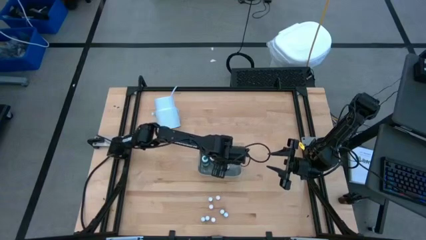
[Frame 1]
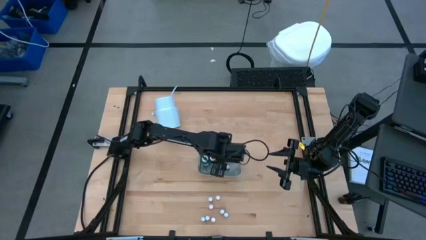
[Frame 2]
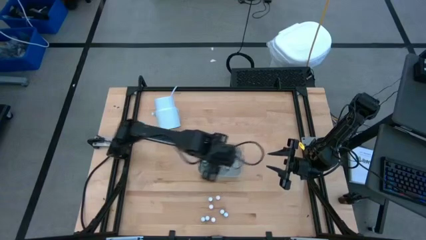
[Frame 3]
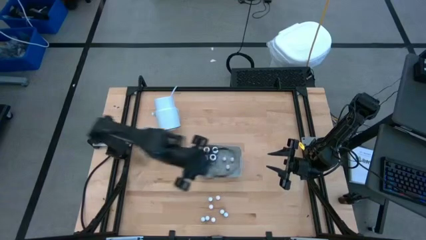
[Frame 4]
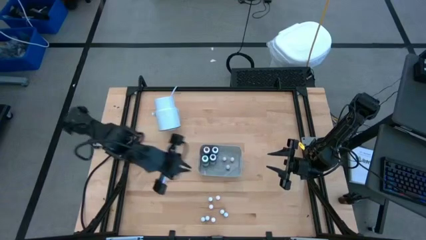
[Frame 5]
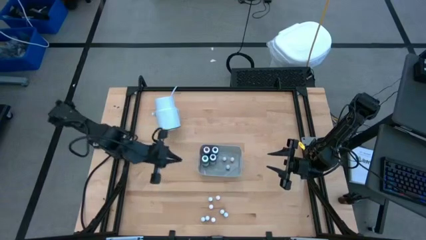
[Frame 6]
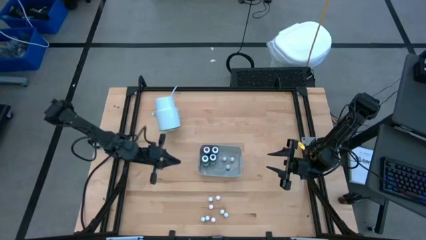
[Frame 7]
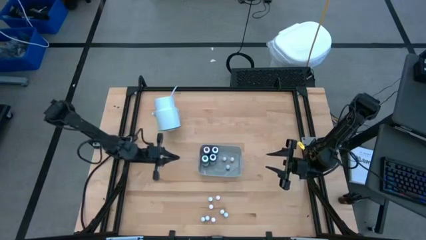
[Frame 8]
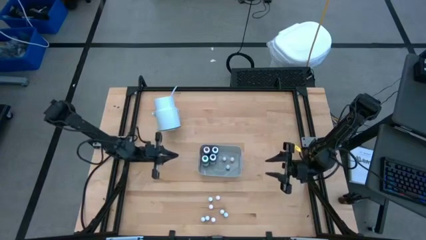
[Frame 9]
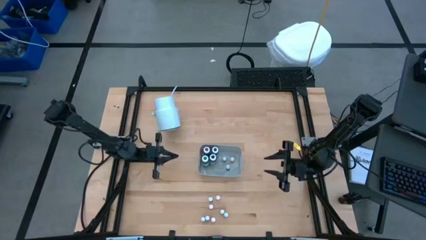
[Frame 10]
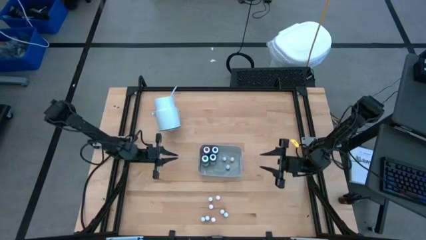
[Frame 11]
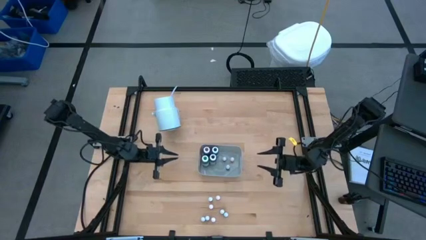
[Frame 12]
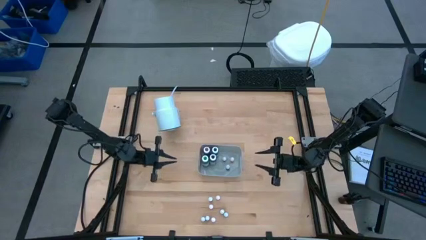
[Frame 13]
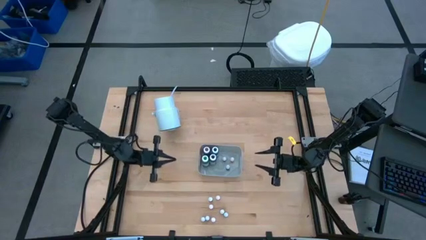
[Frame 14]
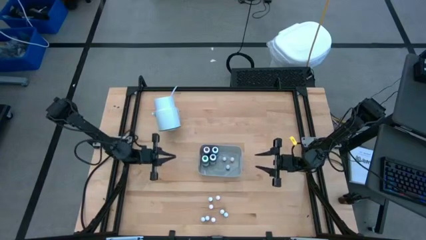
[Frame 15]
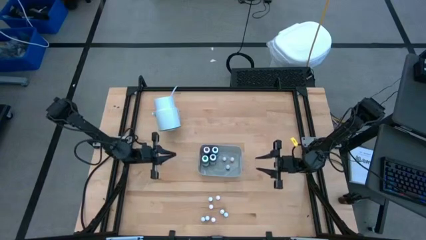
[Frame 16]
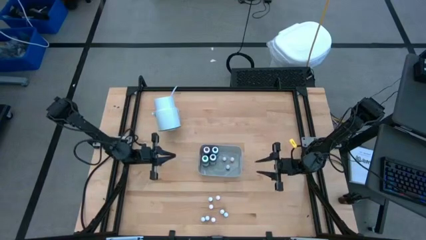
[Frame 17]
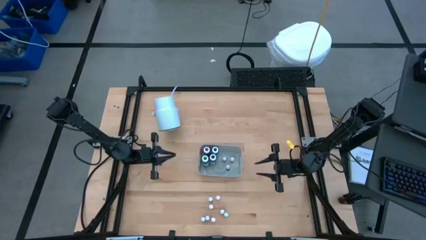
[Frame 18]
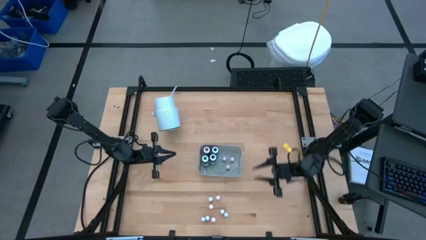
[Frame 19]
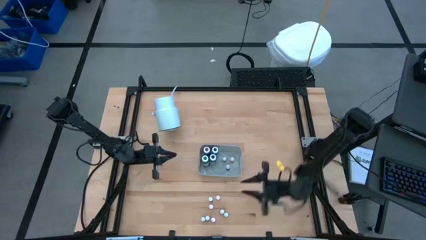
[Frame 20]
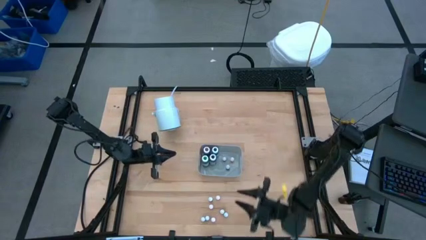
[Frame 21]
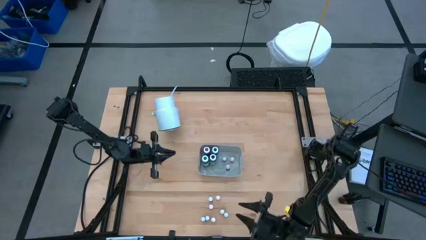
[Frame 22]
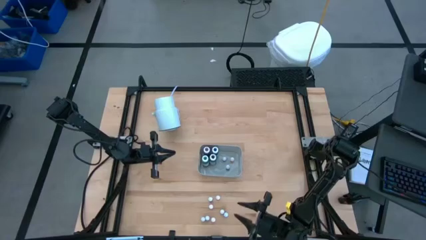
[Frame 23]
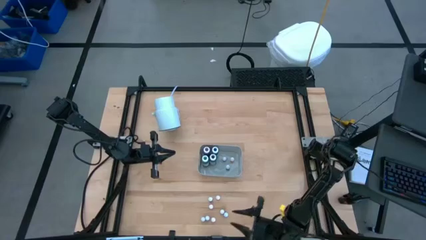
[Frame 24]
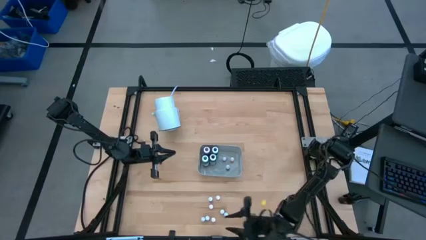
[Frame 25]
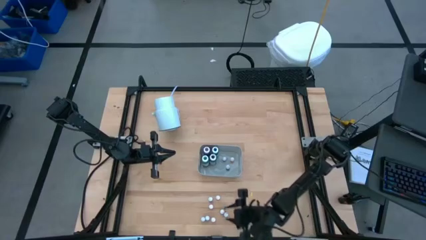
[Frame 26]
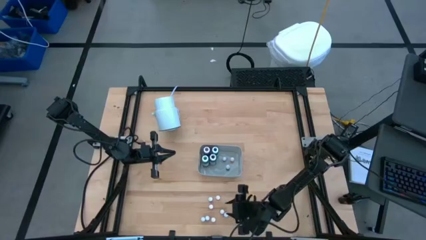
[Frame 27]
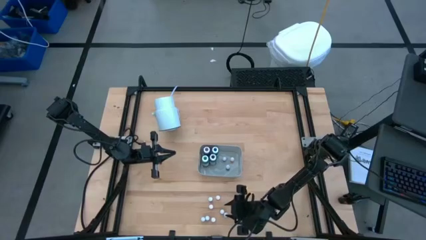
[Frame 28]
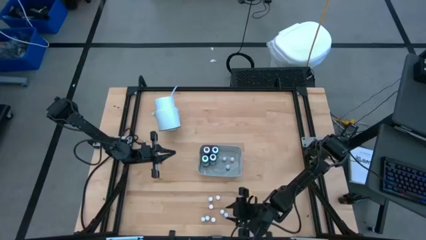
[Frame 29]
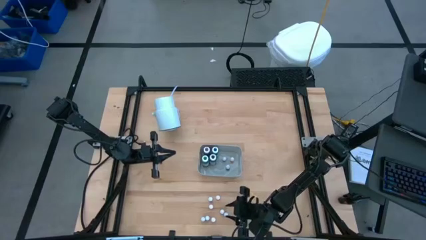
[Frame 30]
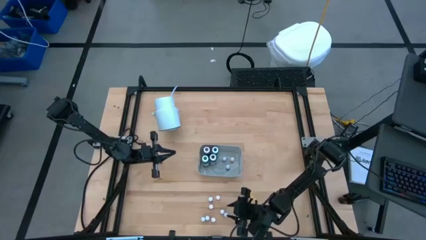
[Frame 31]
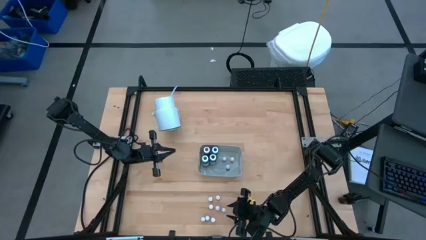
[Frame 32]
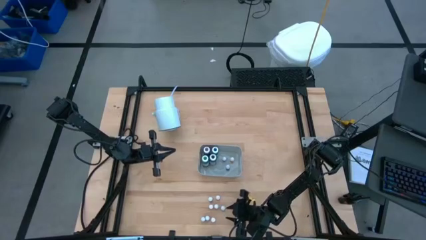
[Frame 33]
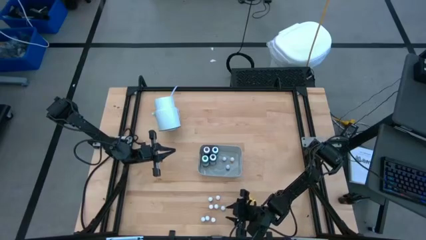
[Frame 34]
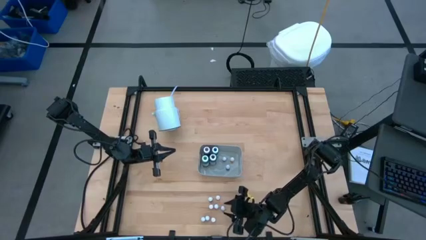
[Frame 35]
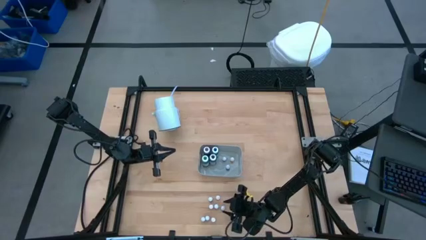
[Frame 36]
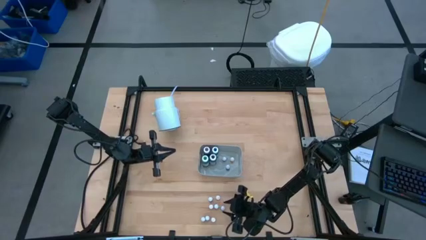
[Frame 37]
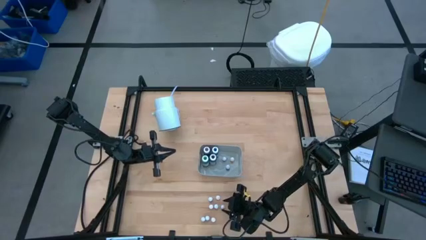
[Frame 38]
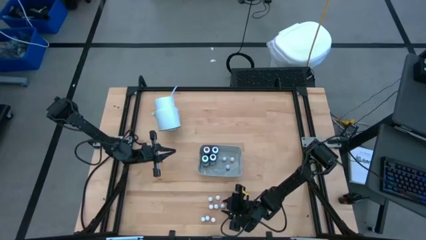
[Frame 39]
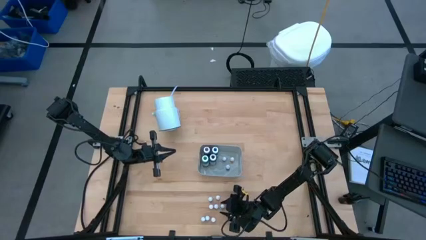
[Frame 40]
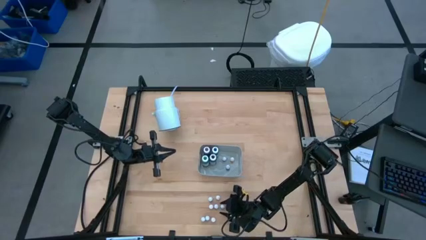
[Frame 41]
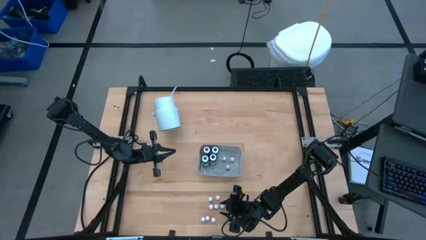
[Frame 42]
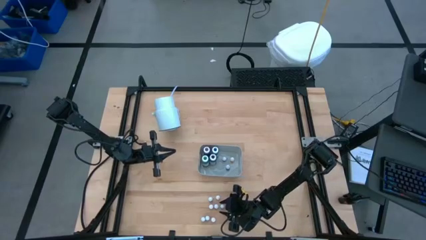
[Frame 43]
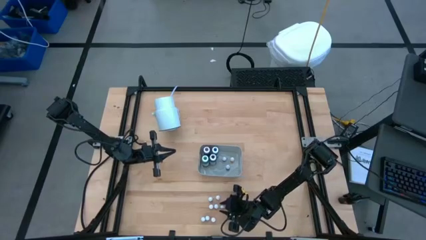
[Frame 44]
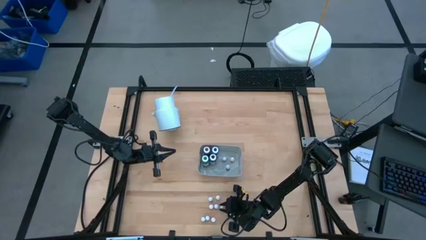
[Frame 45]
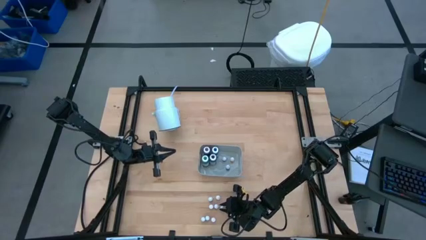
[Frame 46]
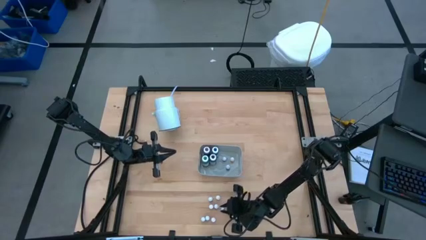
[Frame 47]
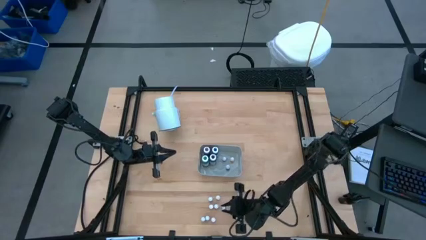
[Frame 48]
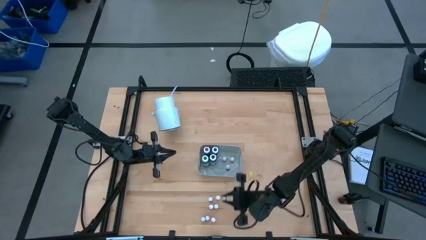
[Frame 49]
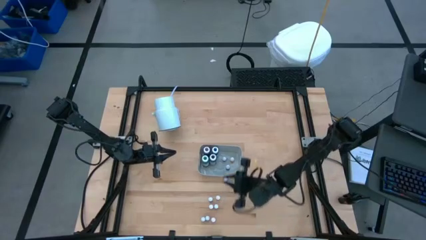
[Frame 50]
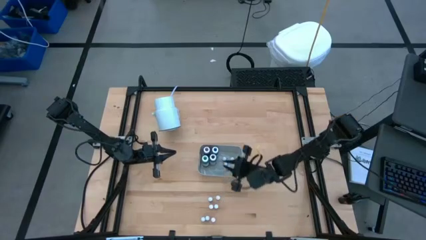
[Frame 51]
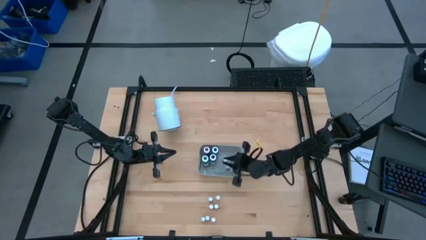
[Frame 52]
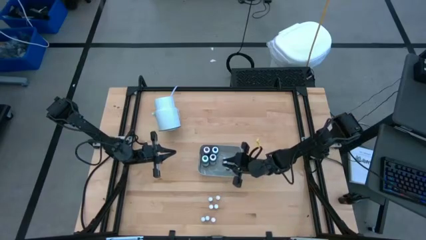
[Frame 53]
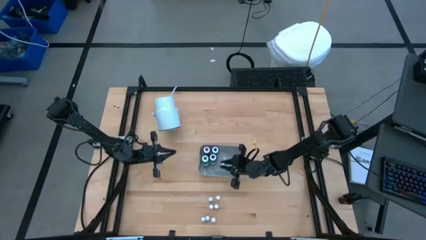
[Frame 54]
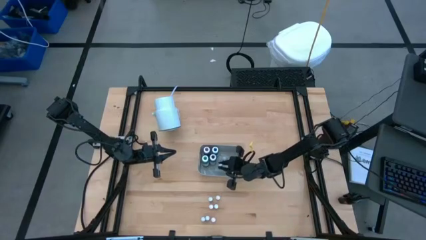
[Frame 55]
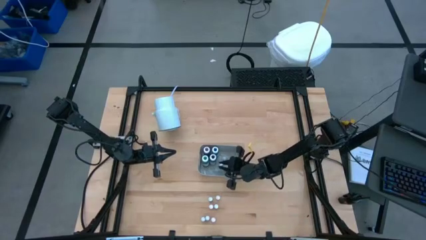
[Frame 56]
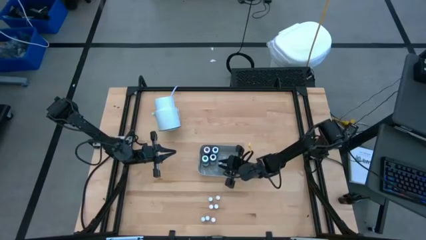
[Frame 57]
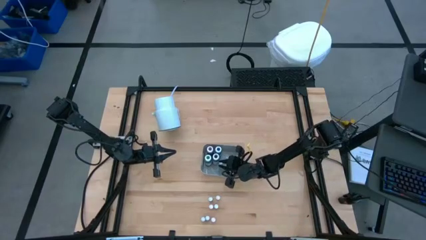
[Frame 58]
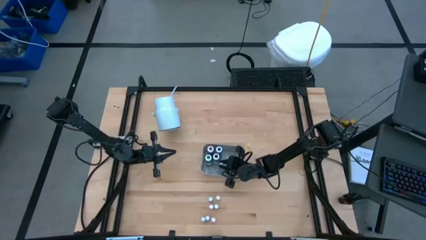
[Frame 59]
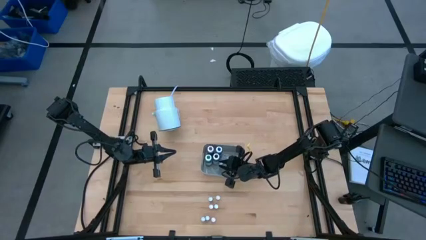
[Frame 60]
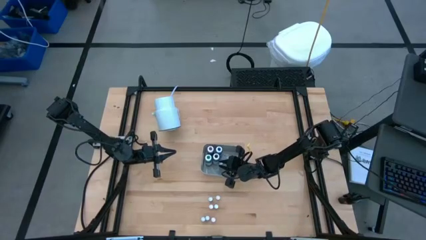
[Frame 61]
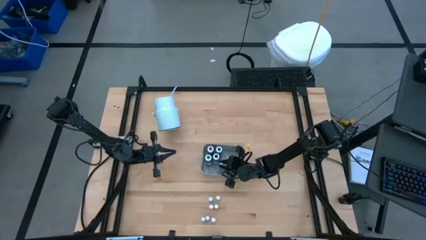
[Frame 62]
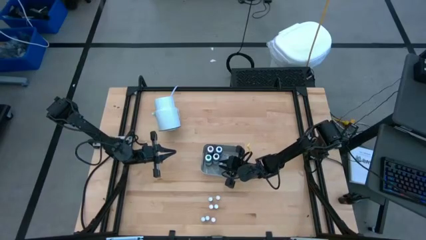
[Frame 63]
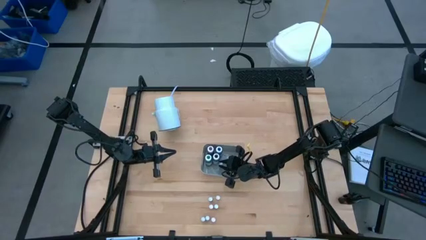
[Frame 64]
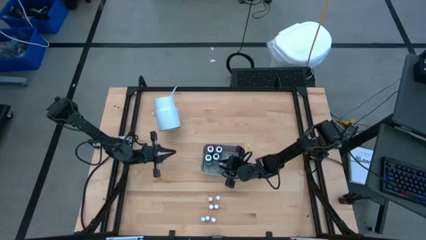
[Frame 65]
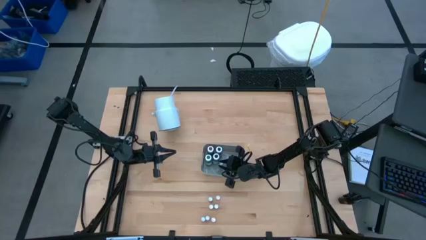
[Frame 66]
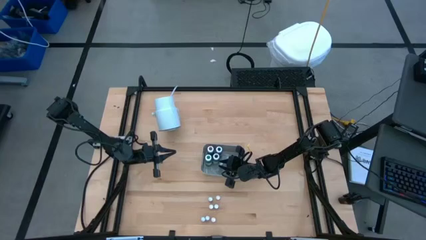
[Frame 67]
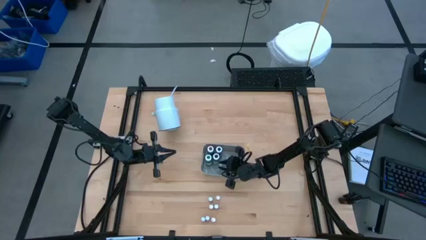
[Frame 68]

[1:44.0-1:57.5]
Task: Pick & Place food coloring
Put the small green food coloring bottle into the bin

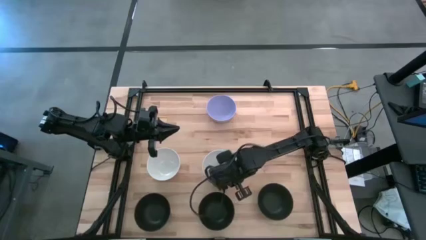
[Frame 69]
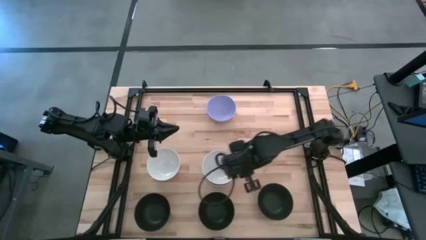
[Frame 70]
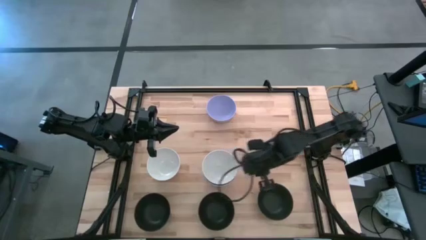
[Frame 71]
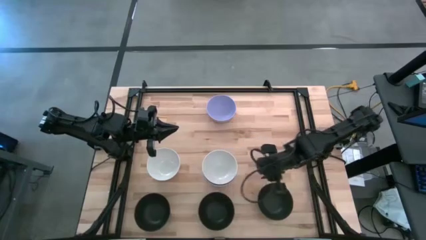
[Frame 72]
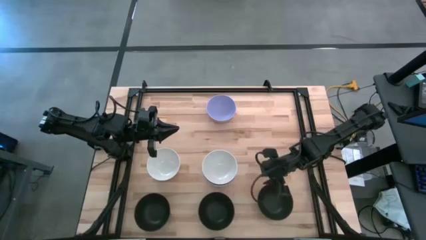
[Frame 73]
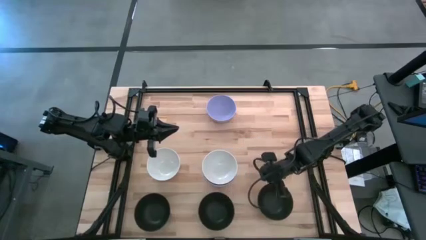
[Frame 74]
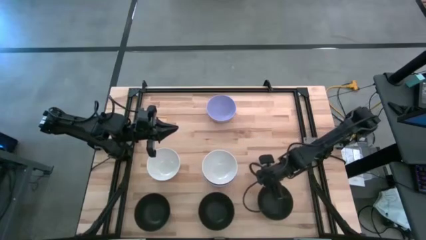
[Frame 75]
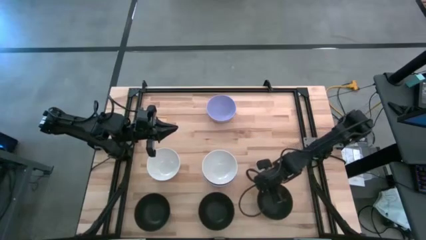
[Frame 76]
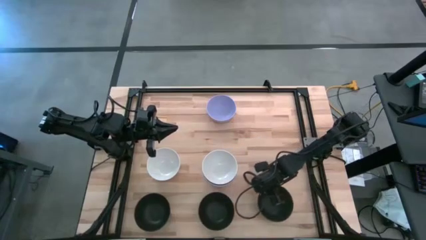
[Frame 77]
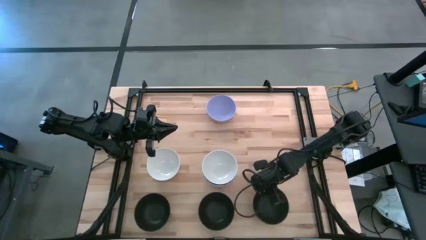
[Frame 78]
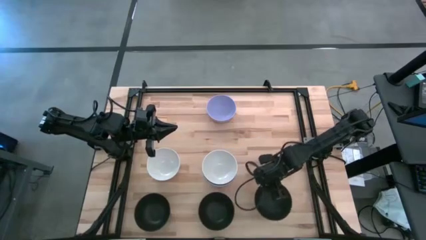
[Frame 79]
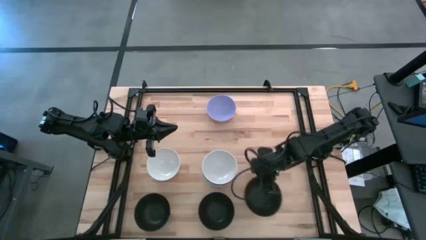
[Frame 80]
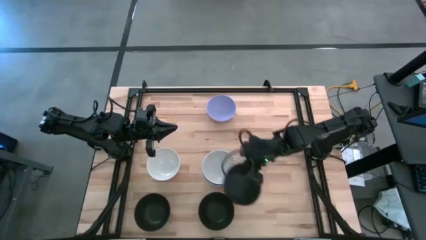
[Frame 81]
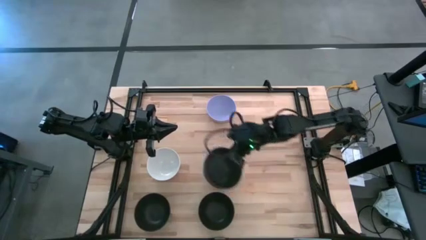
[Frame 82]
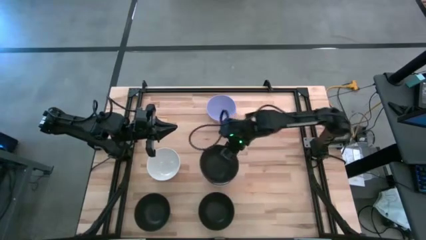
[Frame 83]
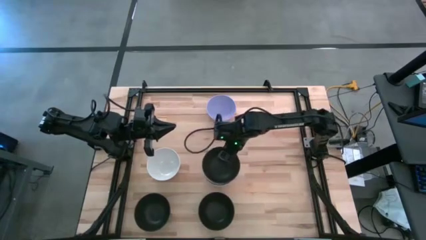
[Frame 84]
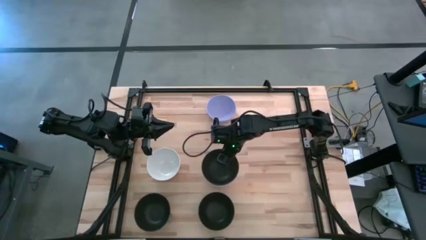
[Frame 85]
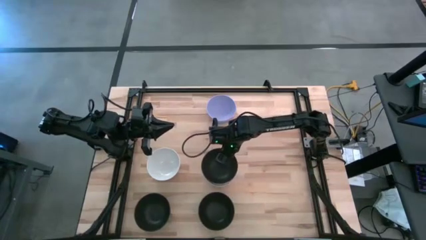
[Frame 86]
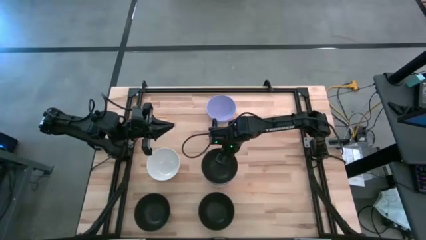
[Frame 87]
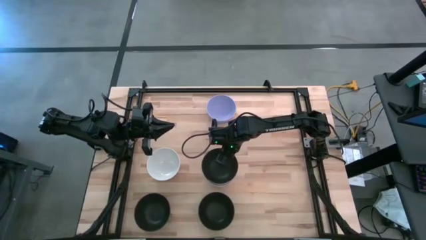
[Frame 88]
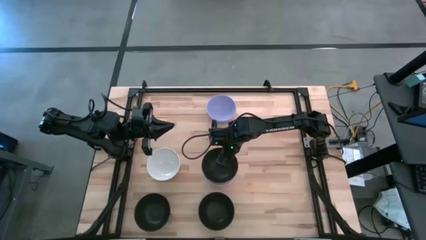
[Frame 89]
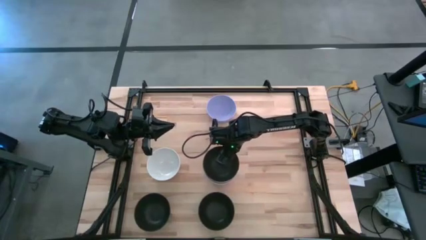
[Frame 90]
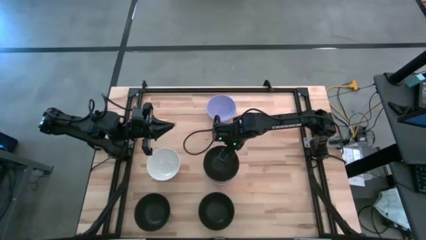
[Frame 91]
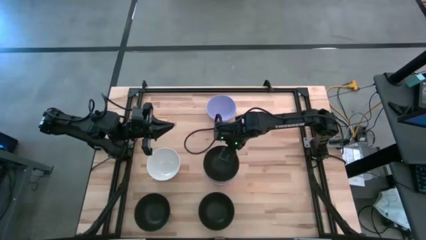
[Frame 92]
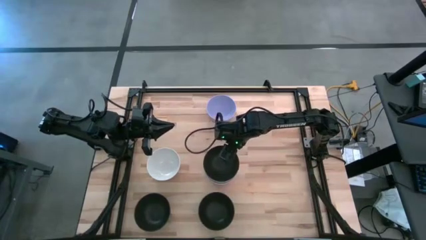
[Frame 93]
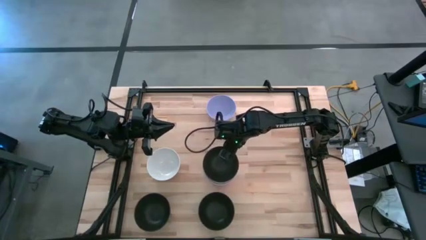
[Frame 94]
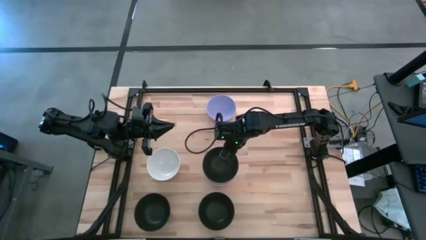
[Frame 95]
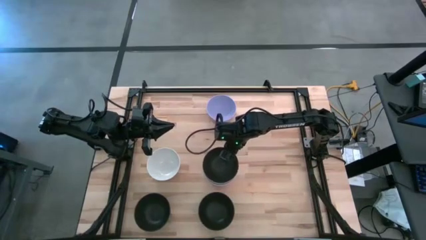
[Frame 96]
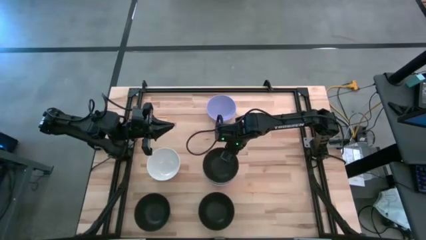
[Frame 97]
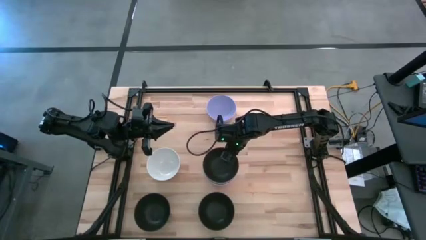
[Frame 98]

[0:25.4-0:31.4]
Task: Nest bowls inside each other
Stack the right black bowl on top of the right white bowl
